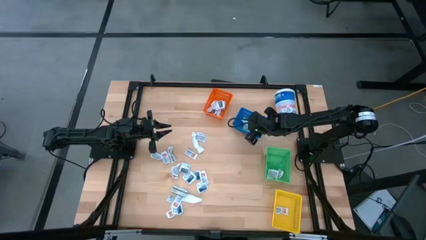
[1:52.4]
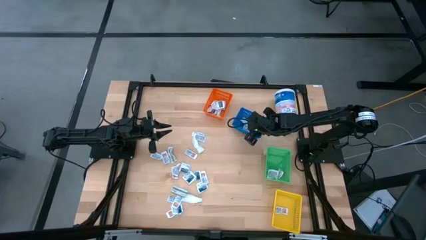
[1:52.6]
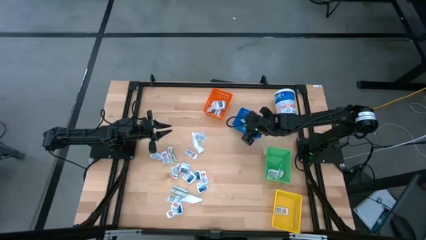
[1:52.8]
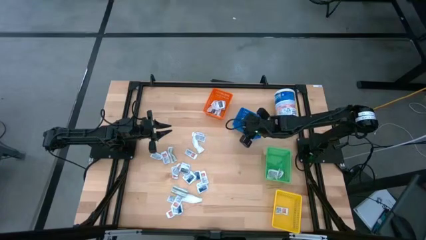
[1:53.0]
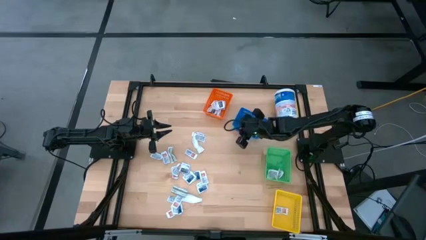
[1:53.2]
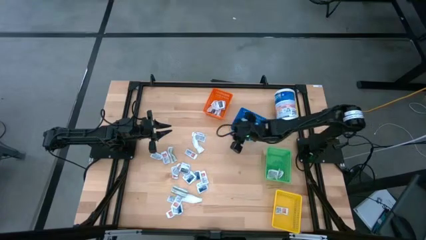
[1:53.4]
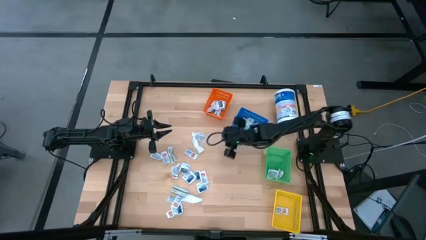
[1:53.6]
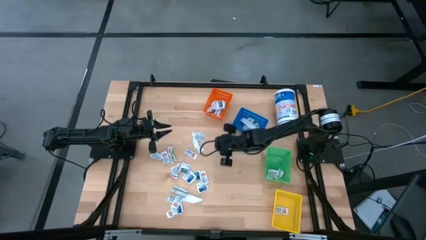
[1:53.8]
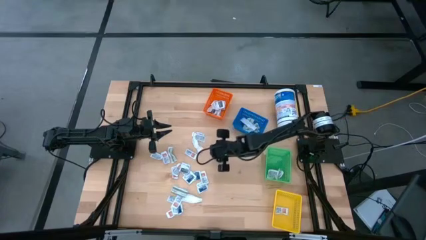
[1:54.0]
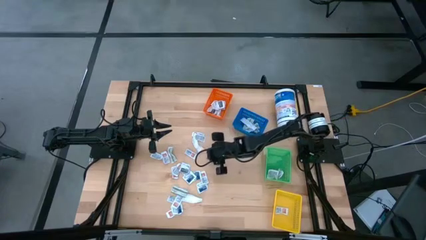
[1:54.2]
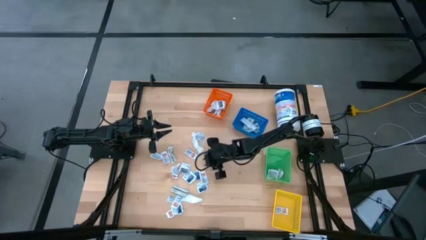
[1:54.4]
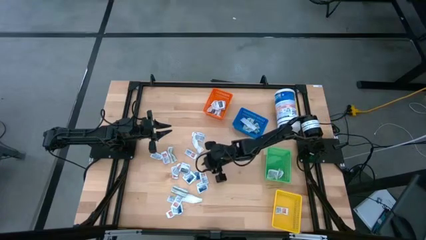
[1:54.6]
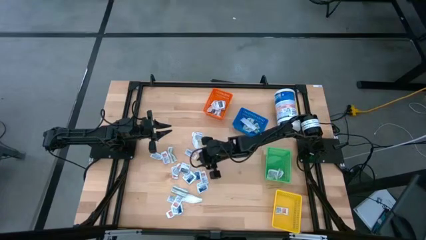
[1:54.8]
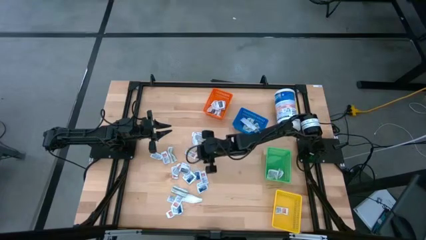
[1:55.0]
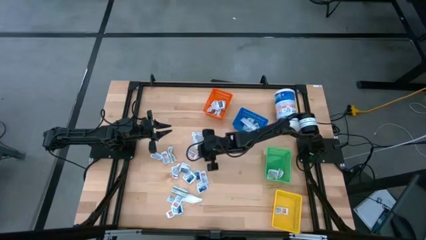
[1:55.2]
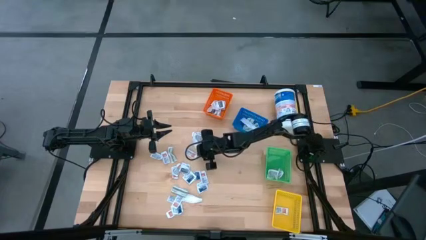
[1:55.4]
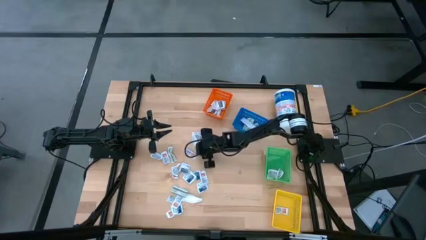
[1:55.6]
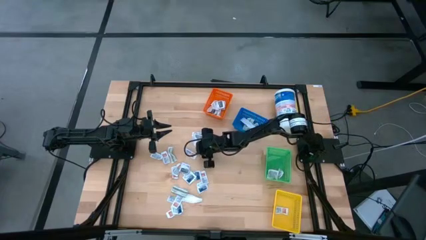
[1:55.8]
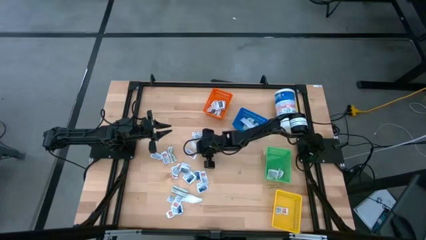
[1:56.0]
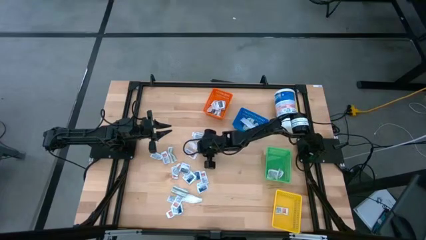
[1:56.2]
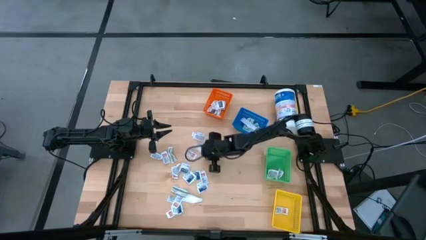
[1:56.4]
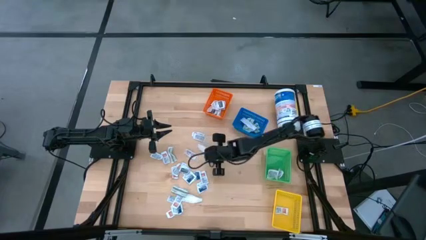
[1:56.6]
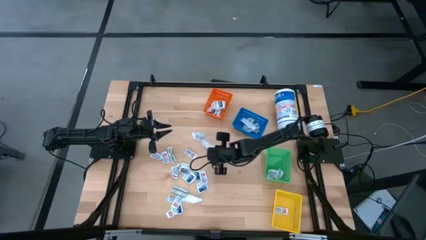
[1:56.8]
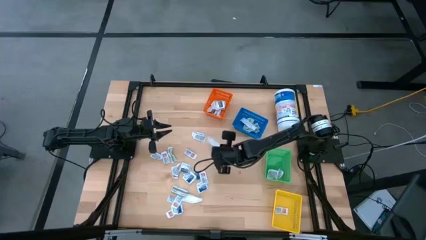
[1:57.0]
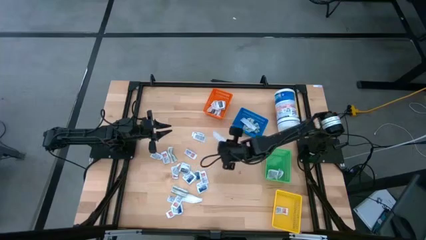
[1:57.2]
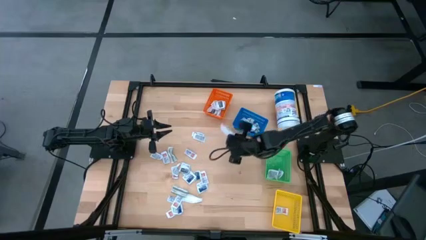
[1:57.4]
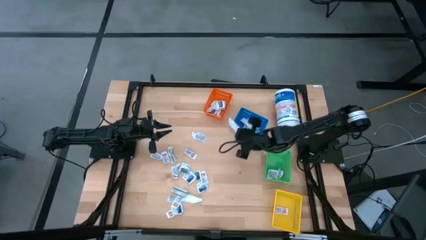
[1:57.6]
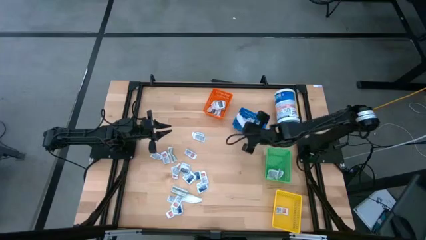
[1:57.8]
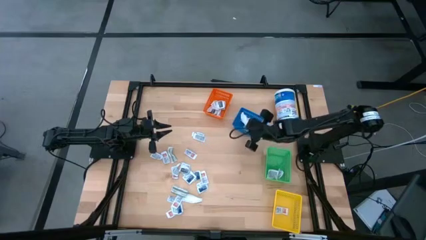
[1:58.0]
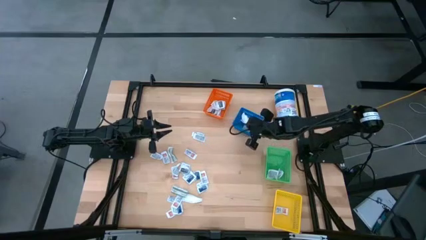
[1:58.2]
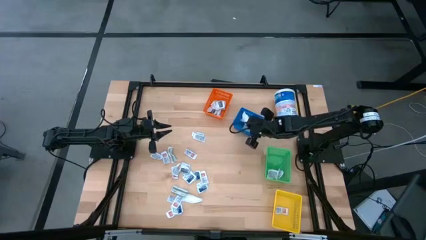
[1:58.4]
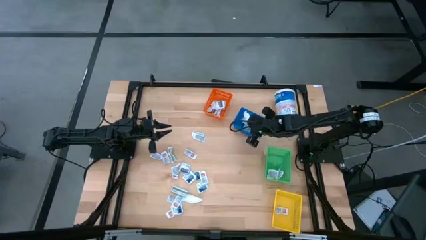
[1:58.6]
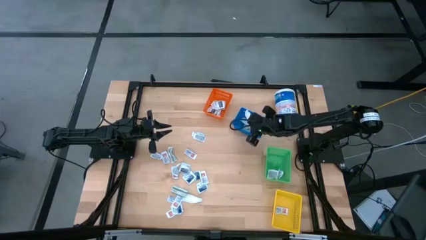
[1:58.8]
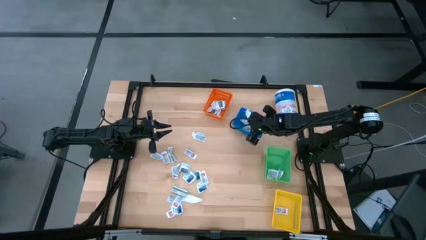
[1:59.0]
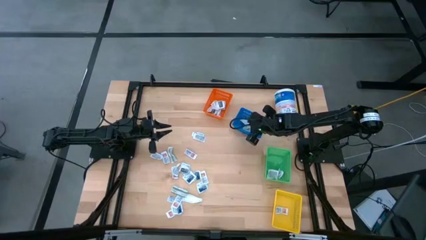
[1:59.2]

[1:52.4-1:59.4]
Task: Pick & Place First Aid Supplies
Put the green bandage pack into the blue basket

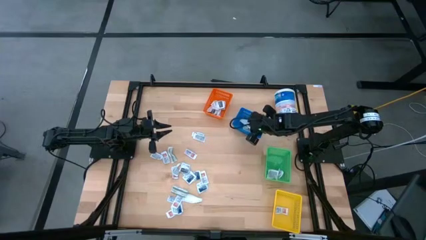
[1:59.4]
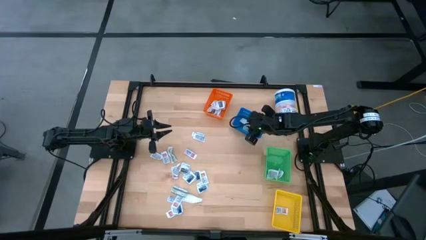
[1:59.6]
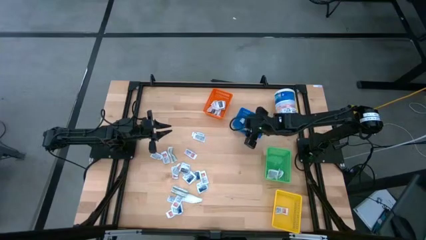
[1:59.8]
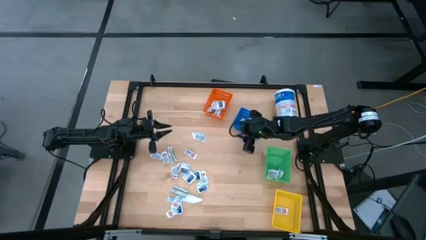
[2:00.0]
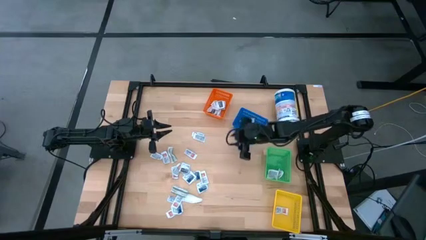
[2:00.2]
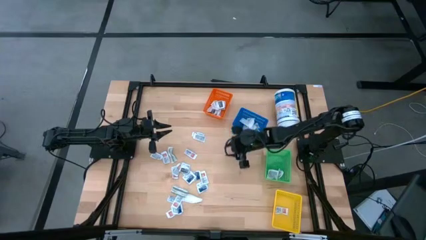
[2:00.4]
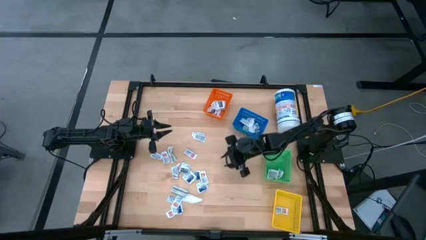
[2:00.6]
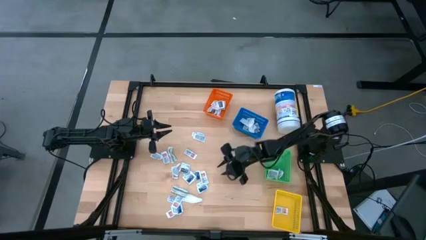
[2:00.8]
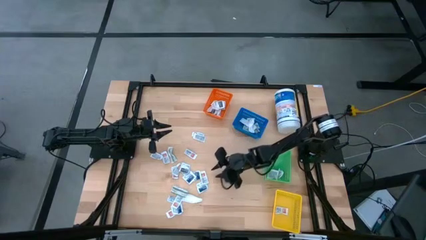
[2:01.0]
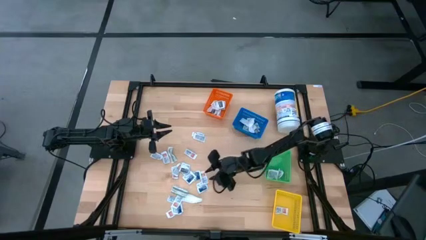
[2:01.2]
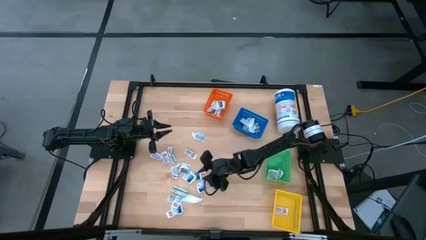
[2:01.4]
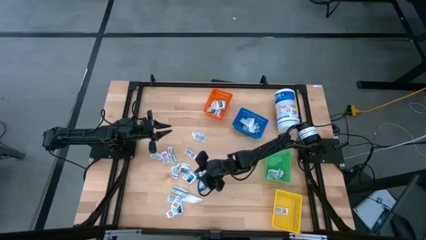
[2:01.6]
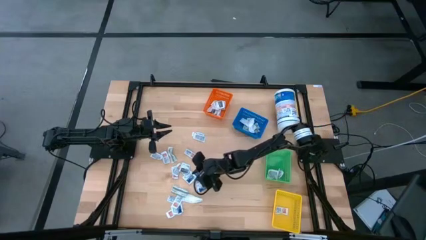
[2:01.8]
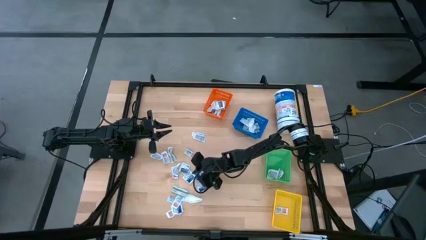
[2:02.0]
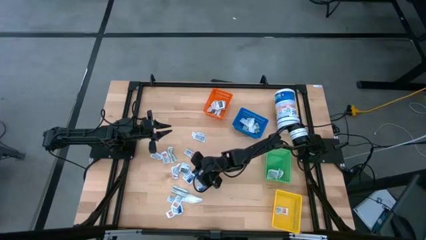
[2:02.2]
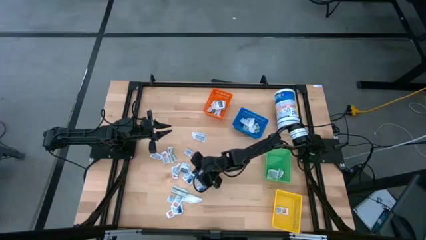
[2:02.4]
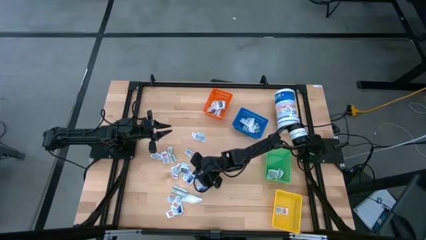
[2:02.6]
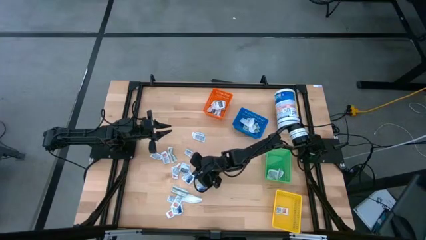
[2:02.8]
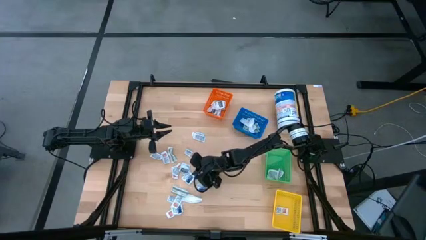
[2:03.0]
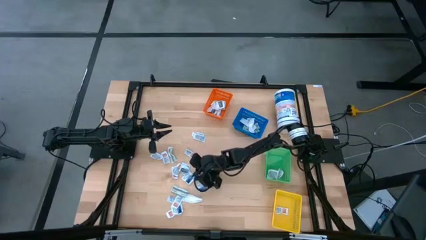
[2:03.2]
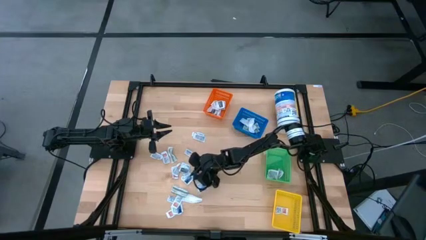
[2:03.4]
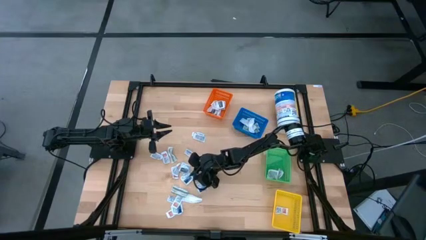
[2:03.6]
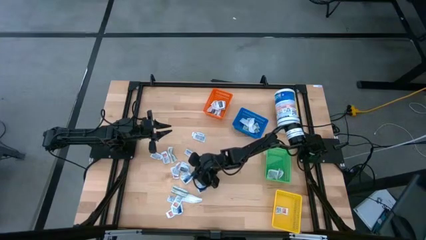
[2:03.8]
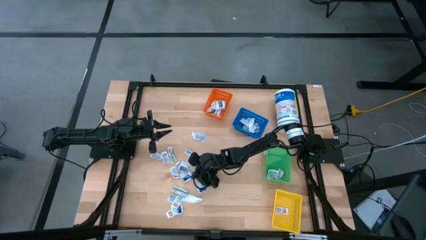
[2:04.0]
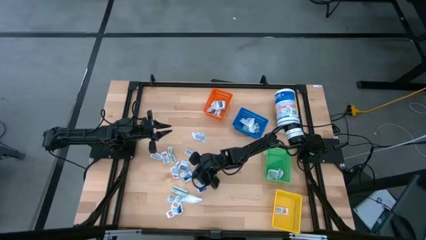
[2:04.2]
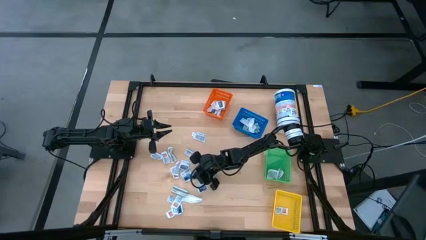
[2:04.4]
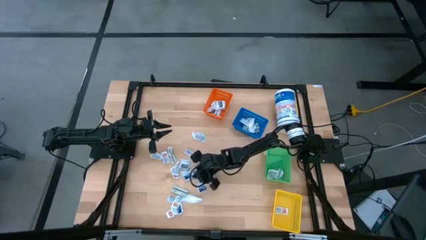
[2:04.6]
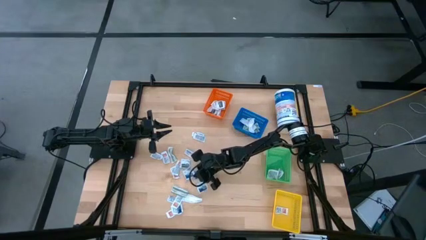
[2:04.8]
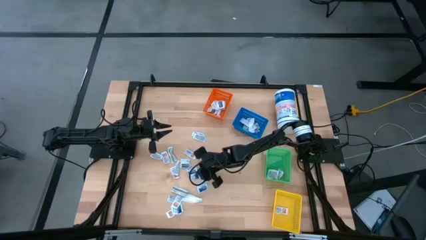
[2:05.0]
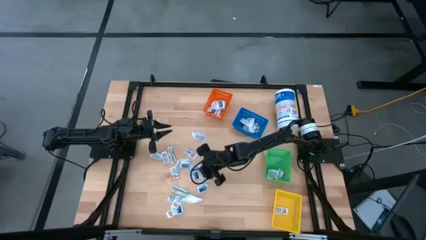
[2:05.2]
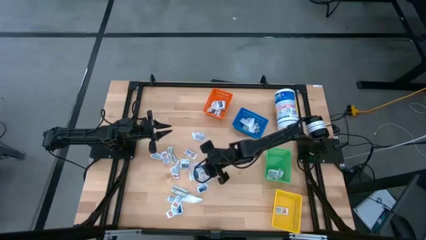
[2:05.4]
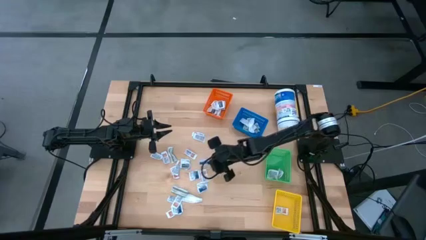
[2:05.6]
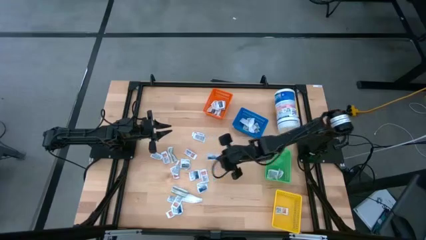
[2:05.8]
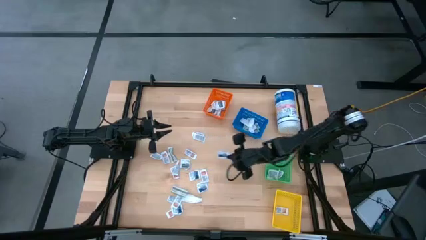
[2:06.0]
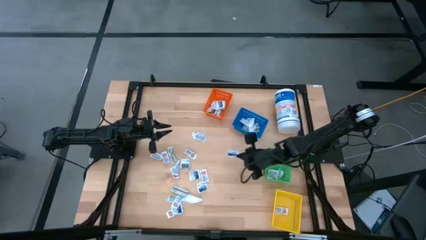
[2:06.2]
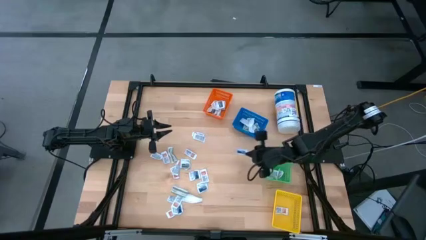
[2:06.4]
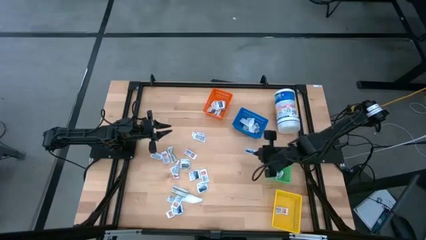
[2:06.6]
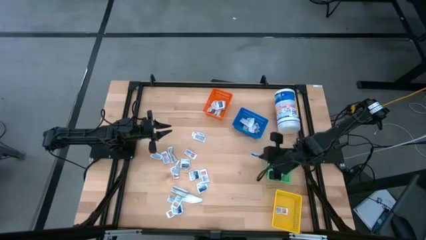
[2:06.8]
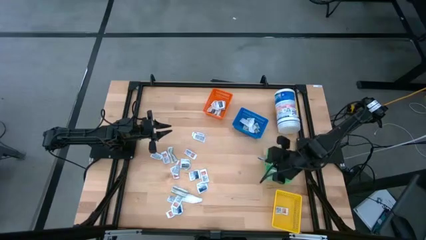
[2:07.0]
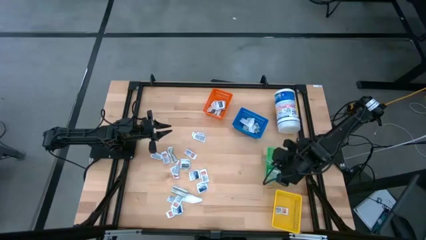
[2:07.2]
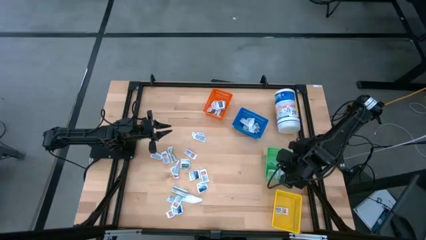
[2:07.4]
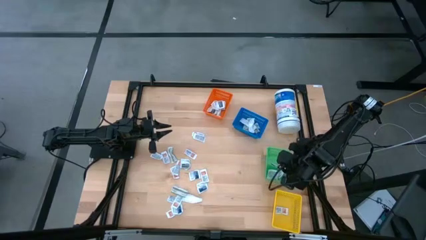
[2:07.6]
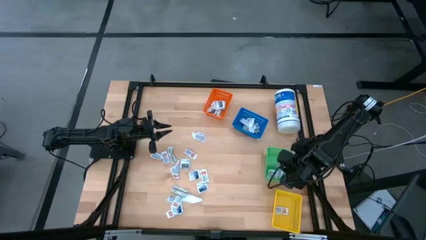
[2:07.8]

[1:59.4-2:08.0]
Put the blue alcohol pad into the green basket

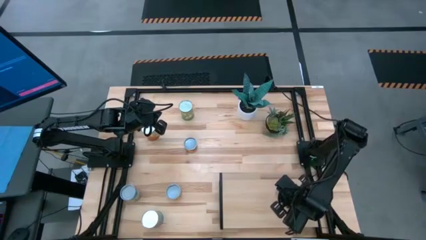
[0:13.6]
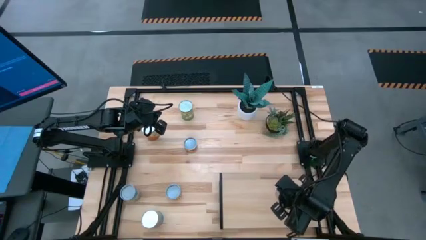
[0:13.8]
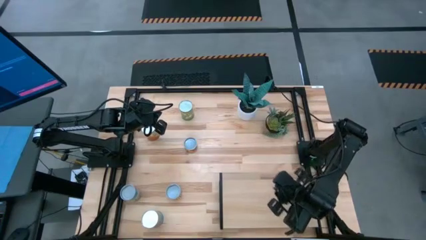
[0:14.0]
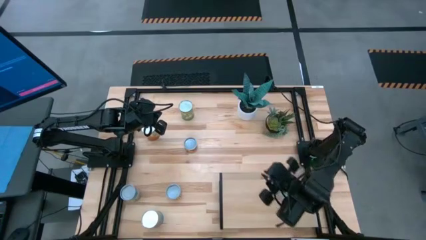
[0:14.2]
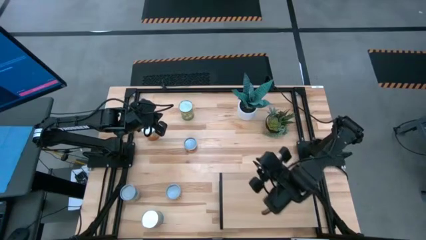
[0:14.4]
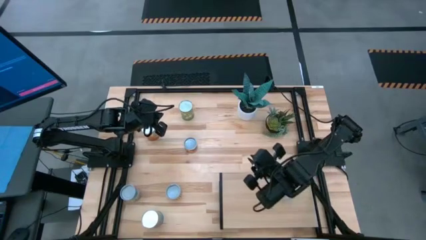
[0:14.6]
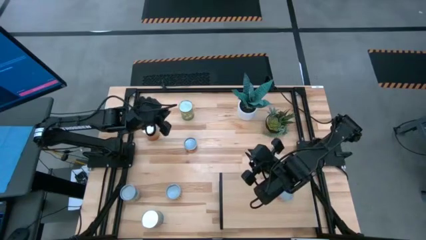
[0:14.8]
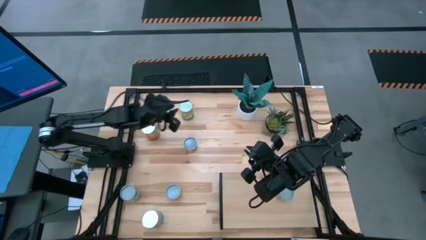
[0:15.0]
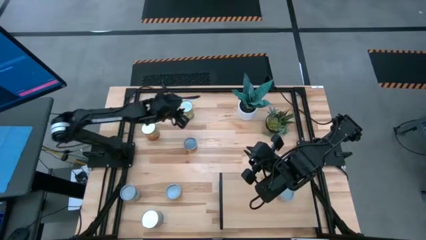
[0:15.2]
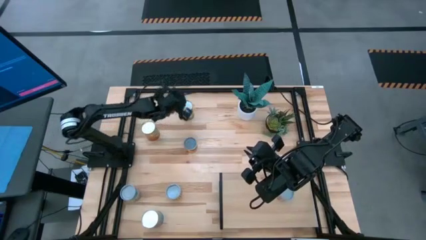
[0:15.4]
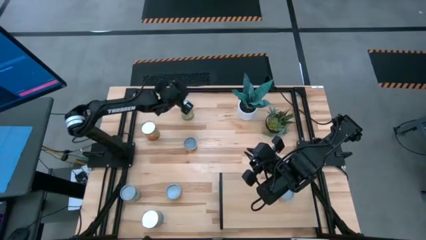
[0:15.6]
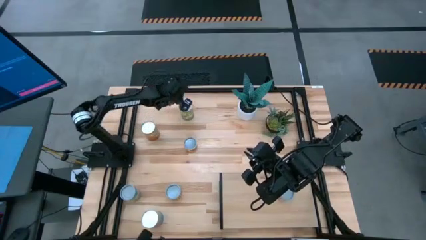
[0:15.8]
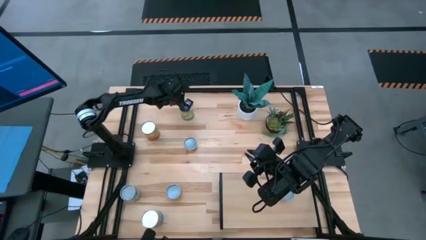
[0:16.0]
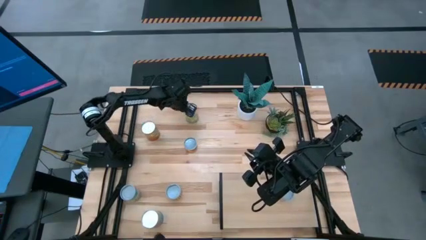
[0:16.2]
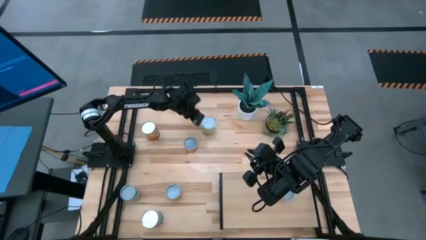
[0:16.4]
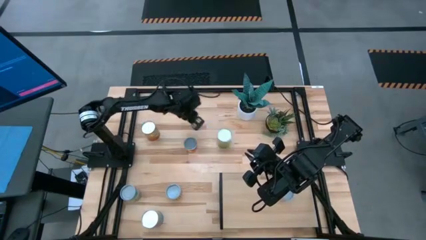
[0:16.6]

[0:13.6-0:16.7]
Task: Pick and place cans onto a shelf
Move the green canned pears from the top left to the center of the table
